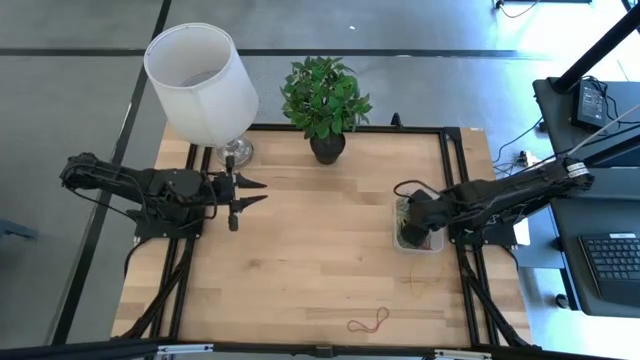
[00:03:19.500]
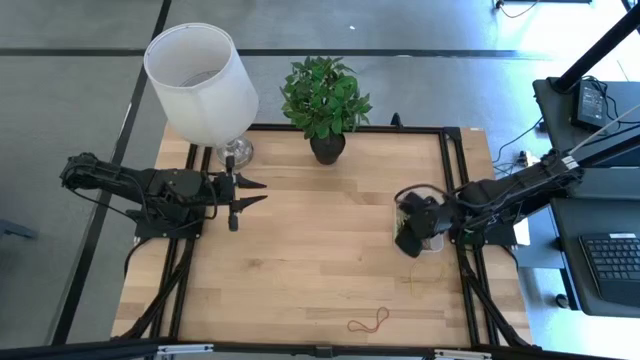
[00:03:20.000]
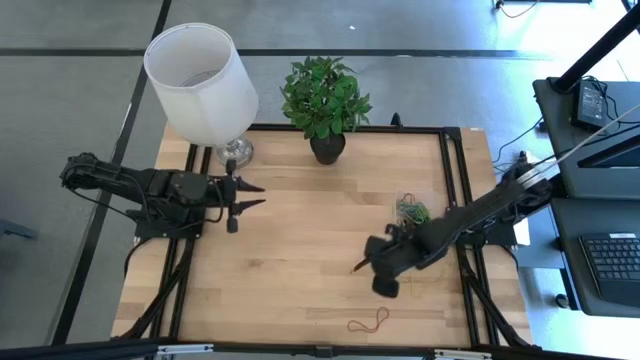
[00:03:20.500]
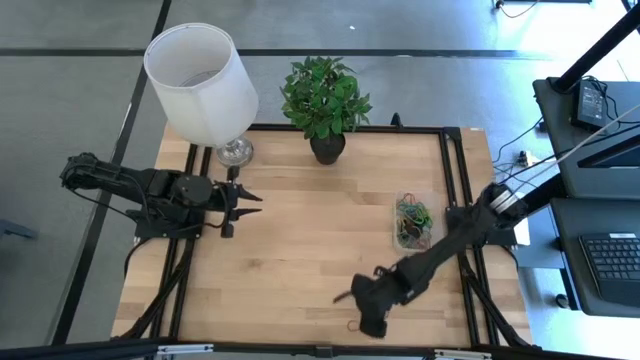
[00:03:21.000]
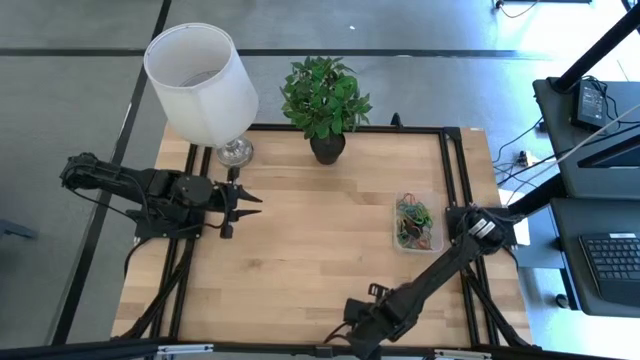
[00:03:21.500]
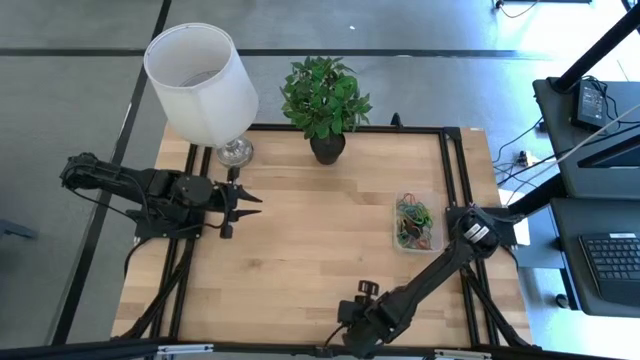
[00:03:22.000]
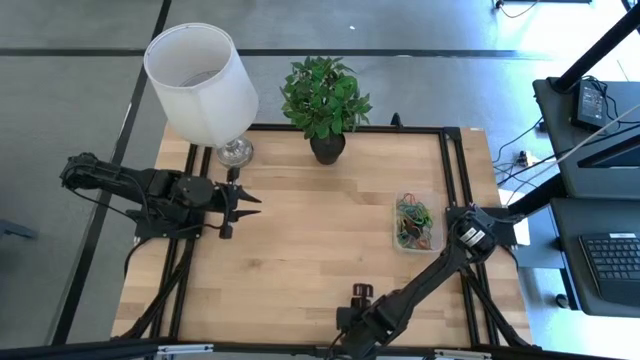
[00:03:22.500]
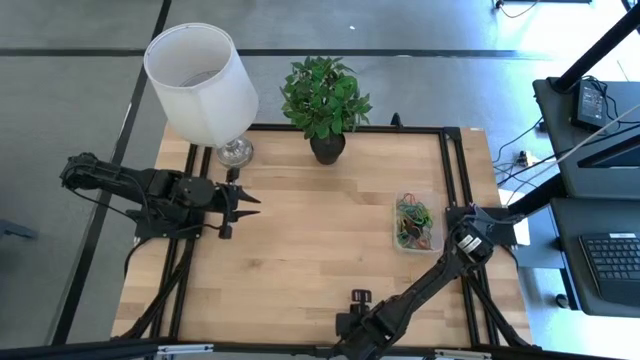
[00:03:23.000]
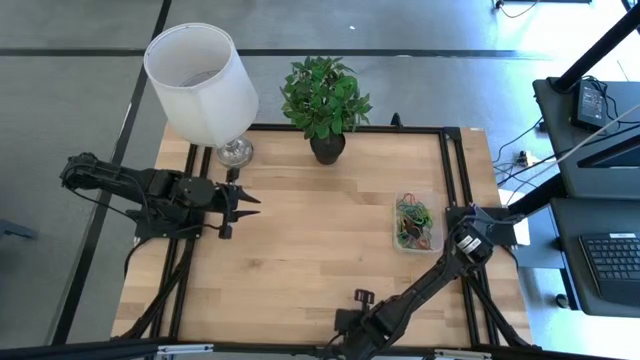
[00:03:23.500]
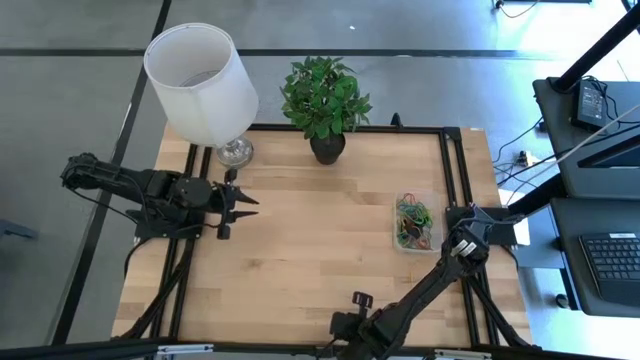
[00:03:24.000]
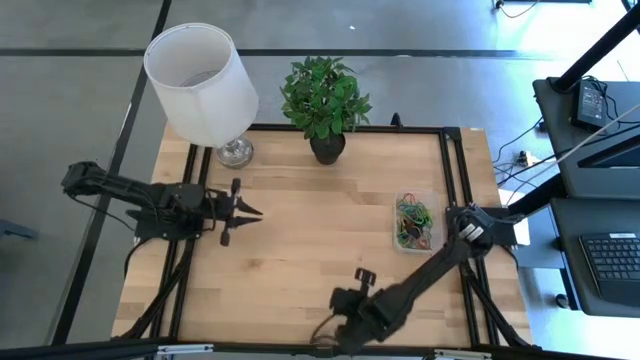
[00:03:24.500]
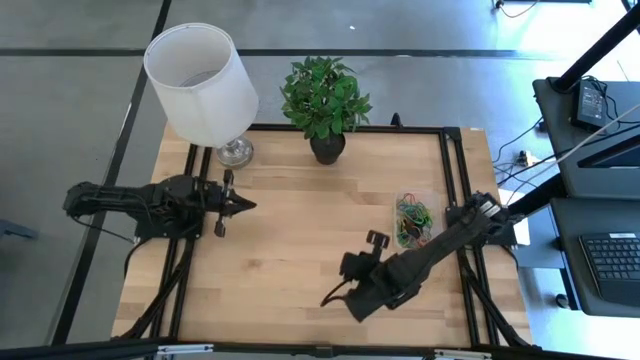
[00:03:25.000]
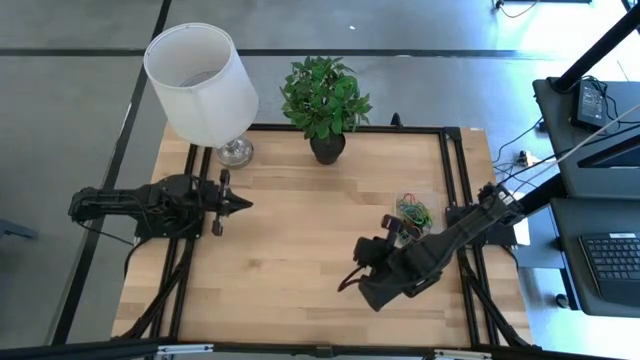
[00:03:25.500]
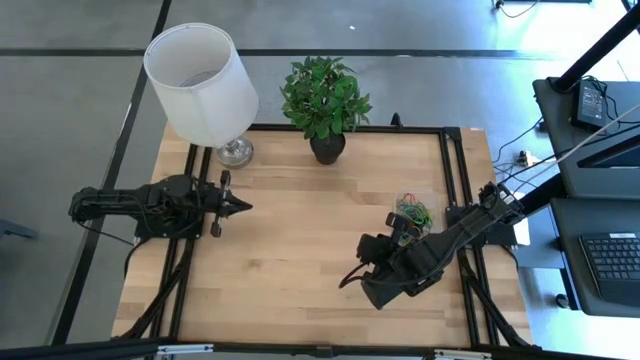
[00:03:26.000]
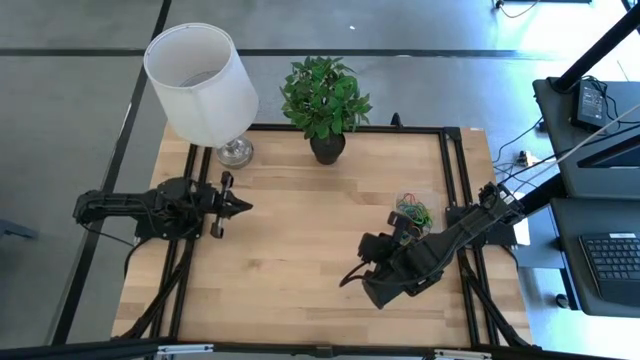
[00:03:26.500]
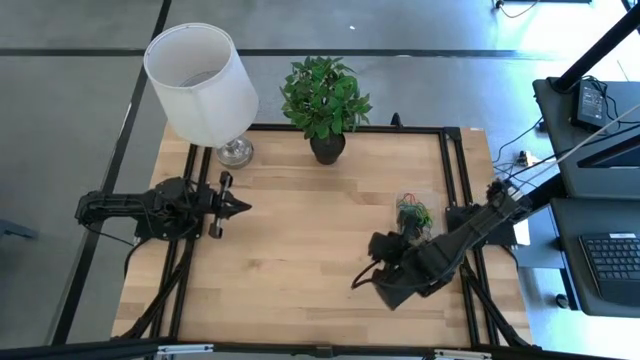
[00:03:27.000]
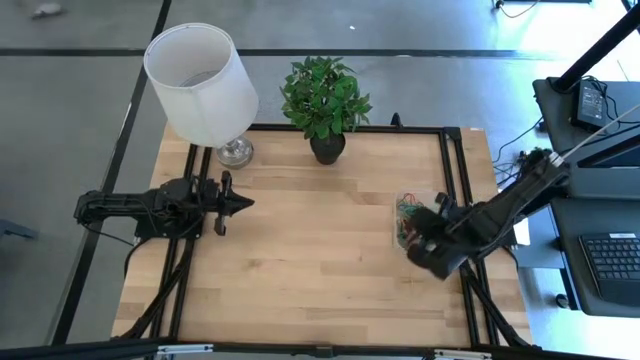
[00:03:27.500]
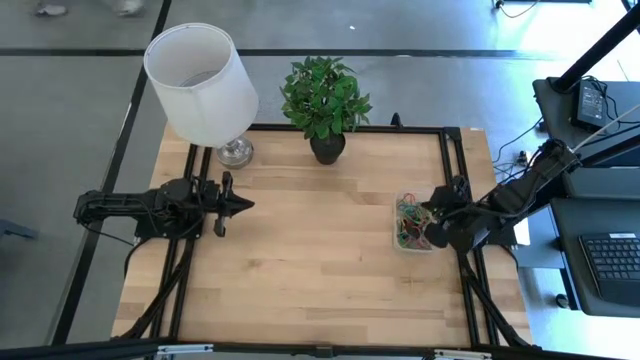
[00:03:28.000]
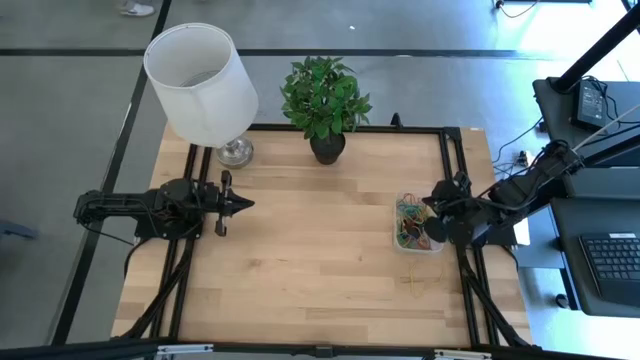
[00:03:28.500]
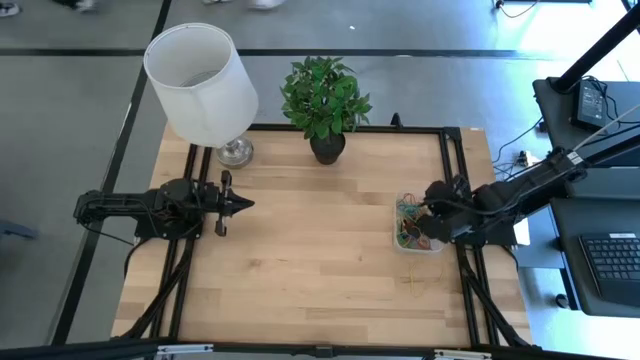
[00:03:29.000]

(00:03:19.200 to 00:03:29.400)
Task: Pick and place rubber bands into bin
Put the red rubber band into the transparent bin

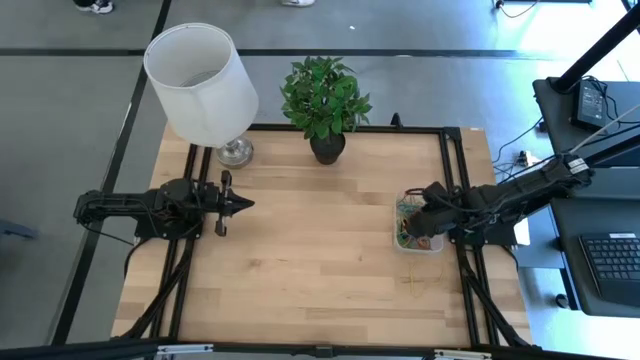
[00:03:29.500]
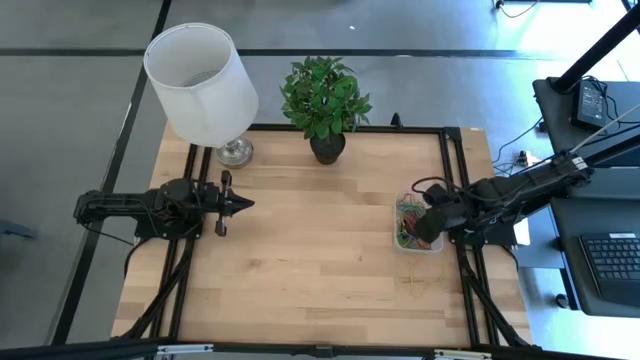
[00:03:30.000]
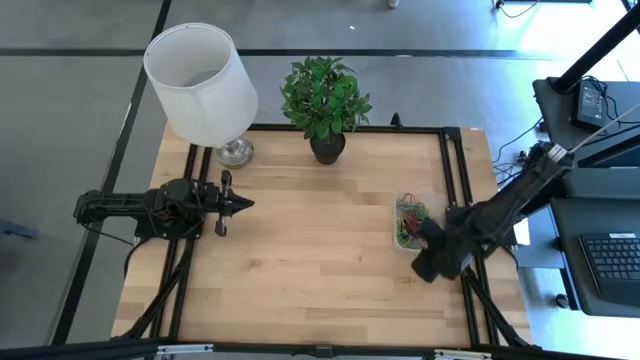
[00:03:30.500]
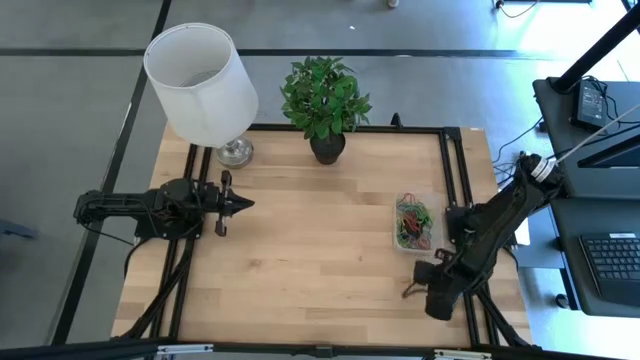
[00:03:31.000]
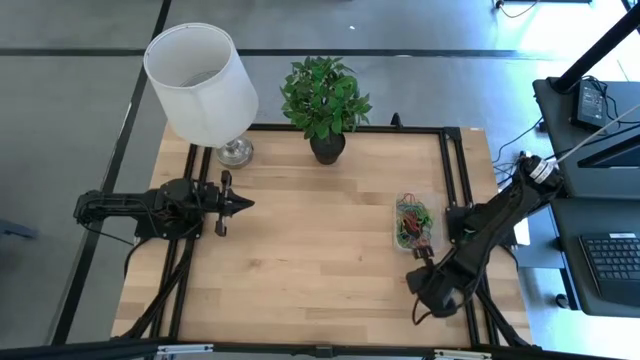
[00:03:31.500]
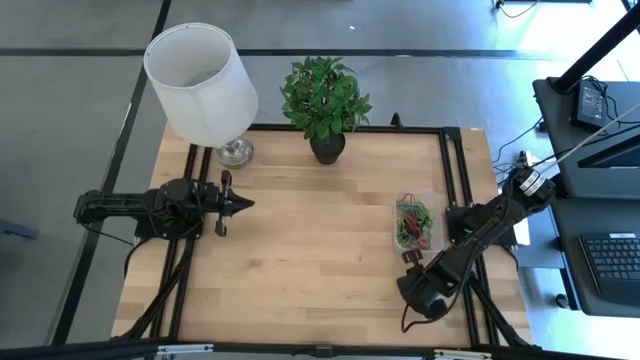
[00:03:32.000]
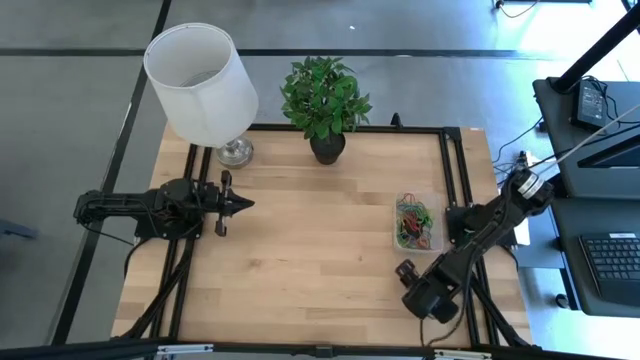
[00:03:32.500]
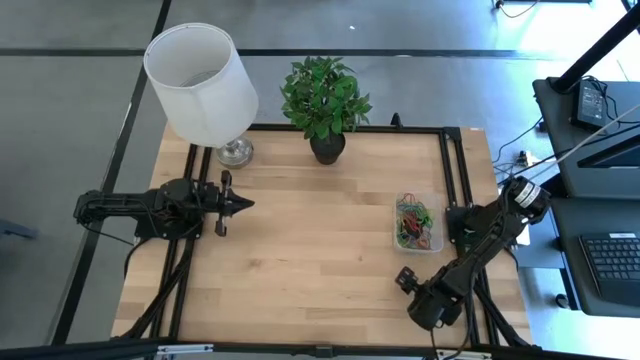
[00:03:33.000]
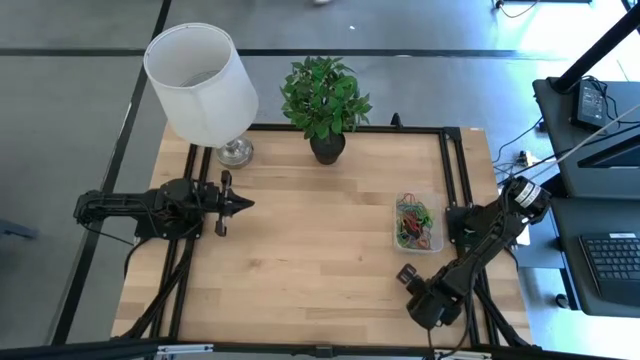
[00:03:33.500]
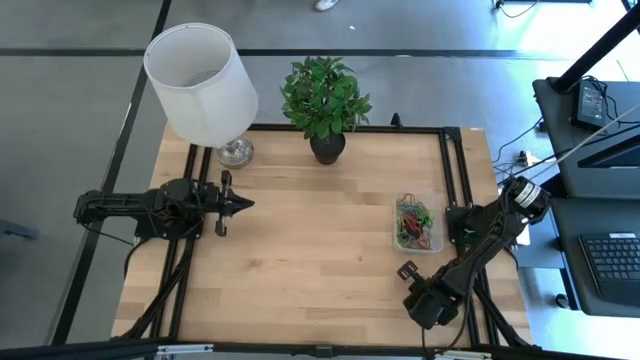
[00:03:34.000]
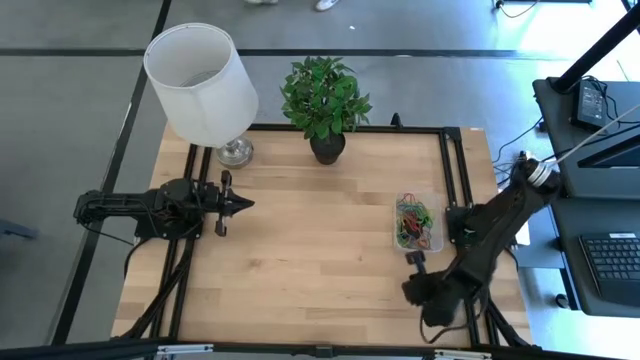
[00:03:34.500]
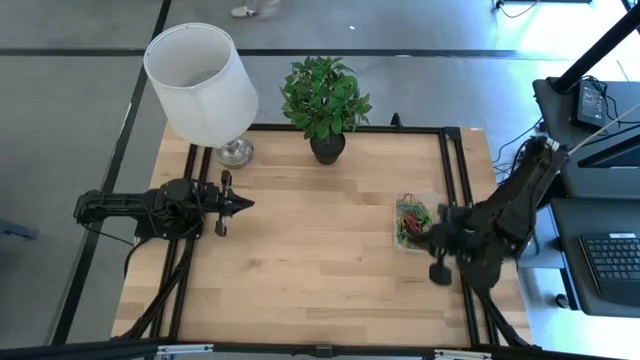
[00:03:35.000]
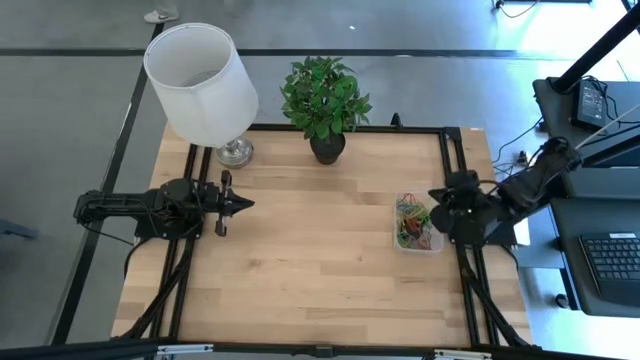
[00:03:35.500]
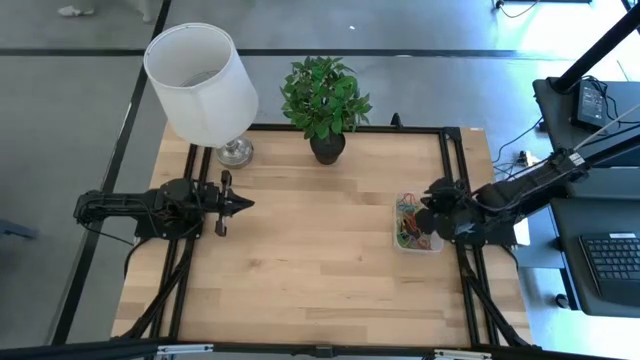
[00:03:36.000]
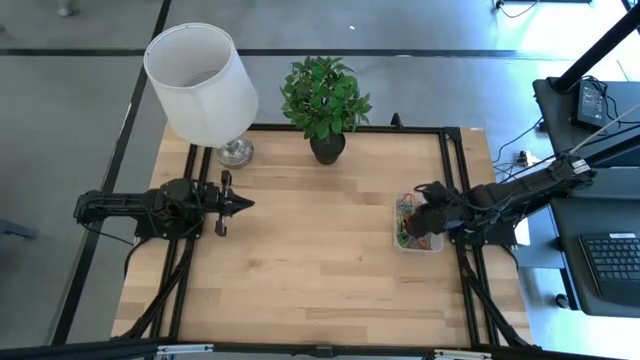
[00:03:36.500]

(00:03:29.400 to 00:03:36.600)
Put the yellow rubber band into the transparent bin

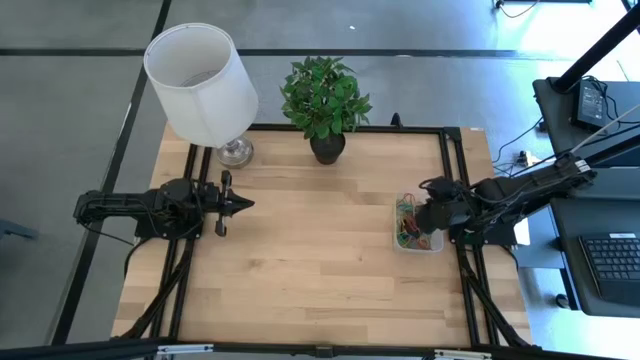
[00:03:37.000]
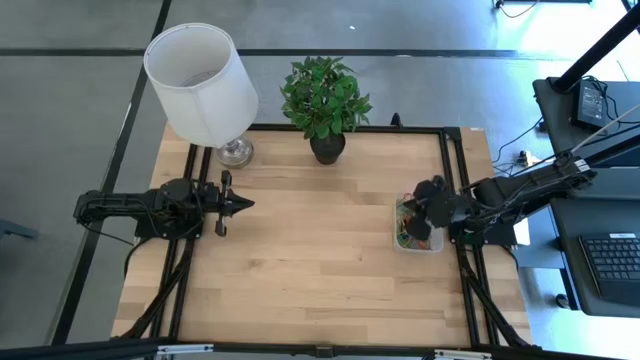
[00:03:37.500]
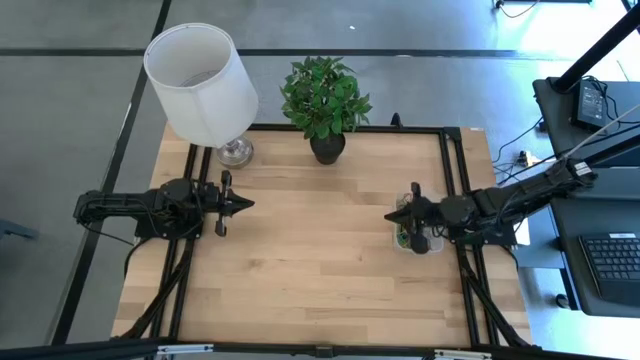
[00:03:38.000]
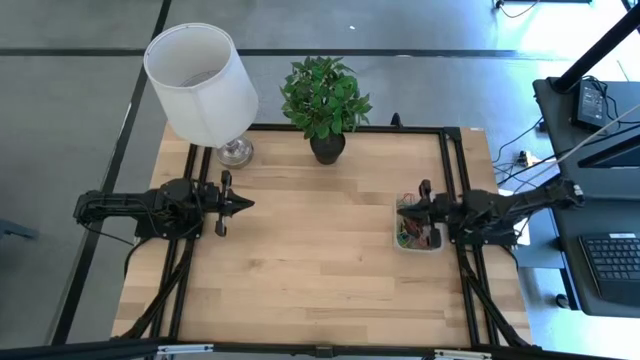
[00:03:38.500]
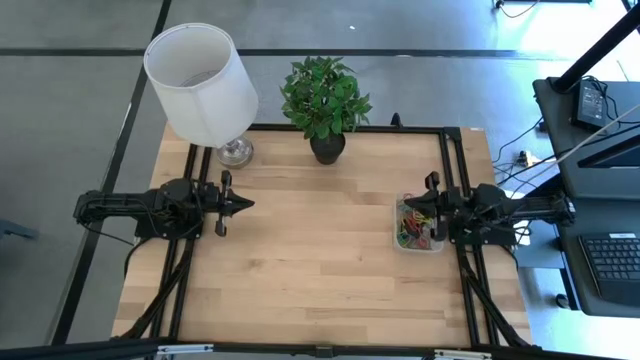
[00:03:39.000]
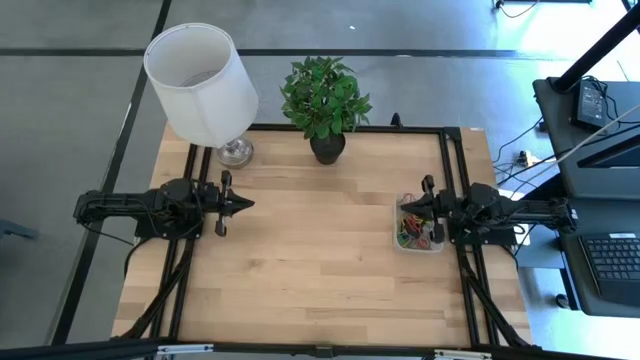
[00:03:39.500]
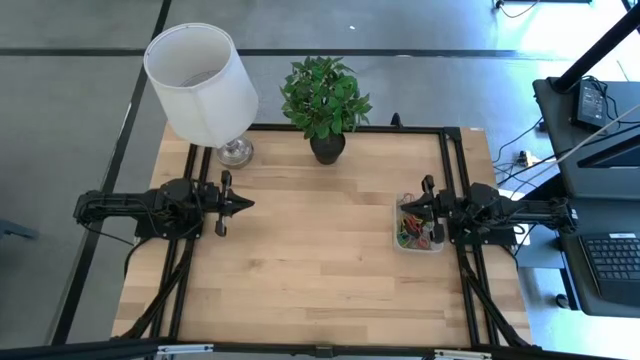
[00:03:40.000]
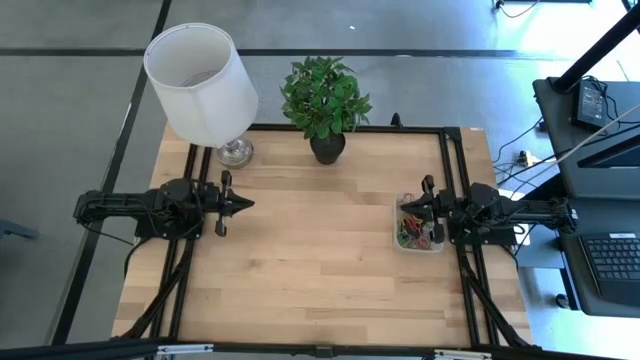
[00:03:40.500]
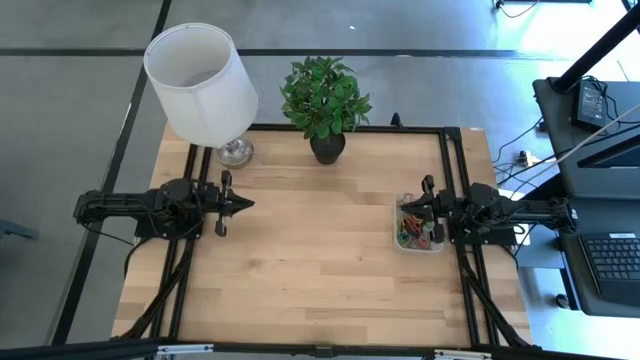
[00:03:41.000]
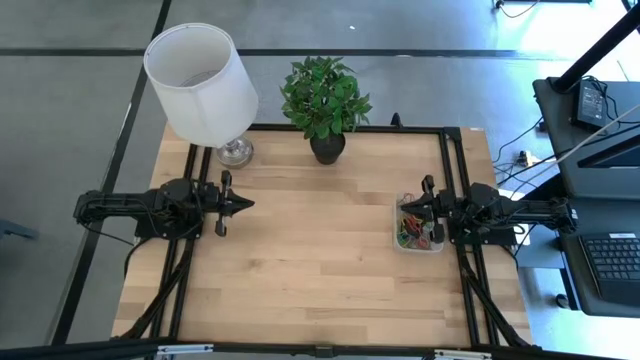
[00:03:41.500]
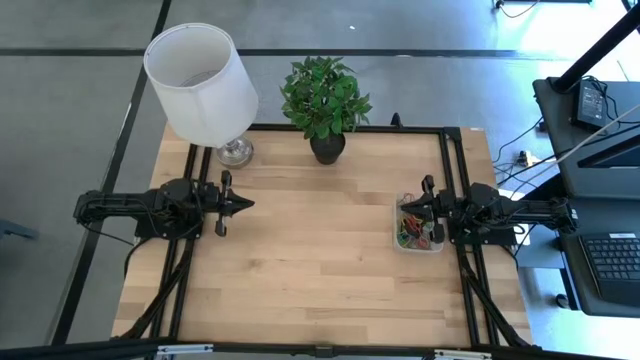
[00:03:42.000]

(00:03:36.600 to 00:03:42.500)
Return to Home Position
